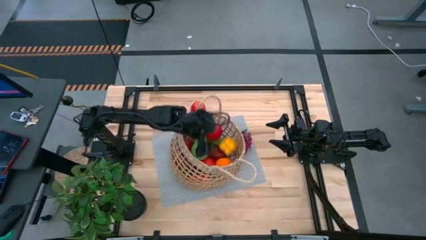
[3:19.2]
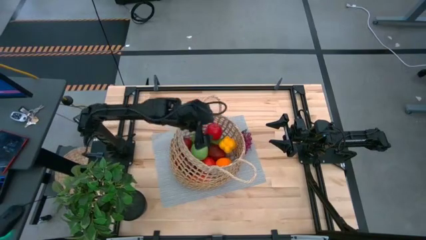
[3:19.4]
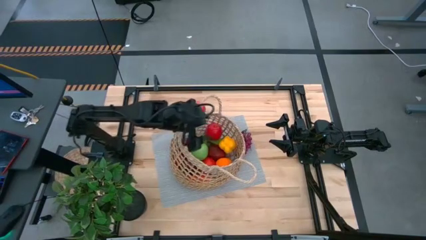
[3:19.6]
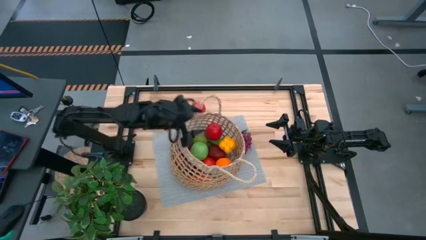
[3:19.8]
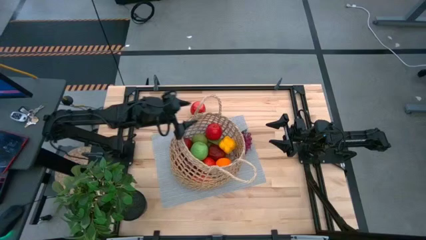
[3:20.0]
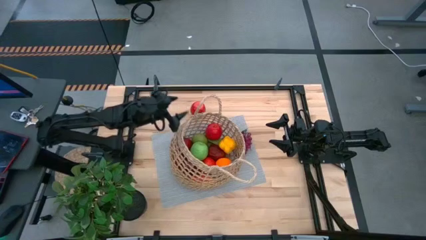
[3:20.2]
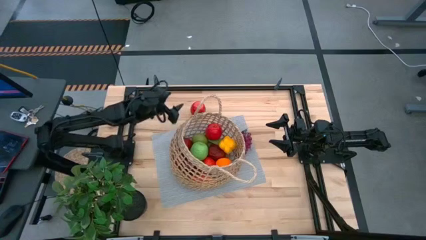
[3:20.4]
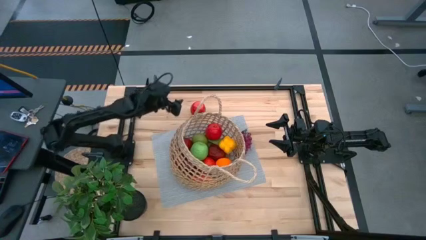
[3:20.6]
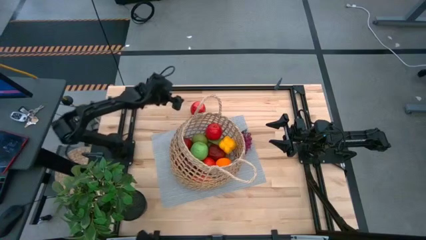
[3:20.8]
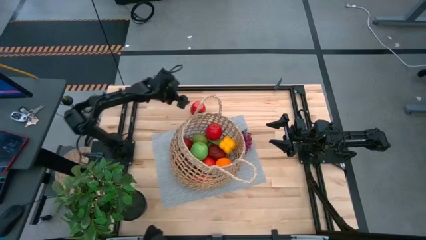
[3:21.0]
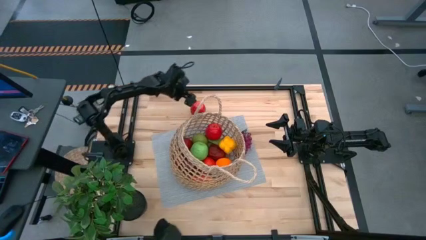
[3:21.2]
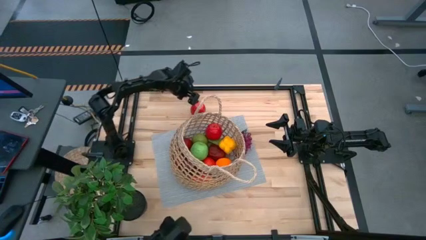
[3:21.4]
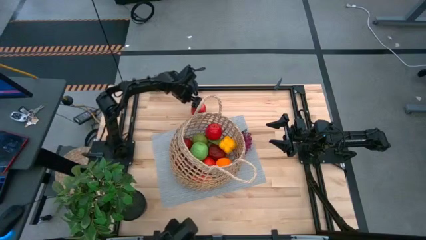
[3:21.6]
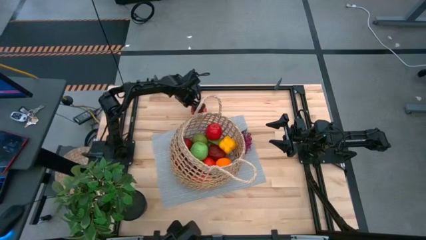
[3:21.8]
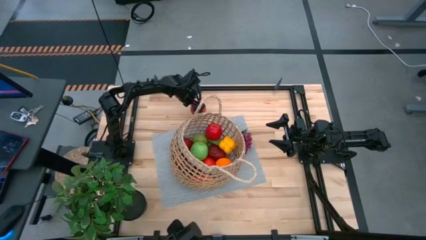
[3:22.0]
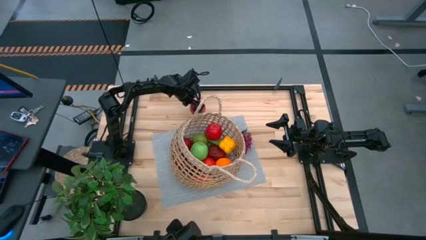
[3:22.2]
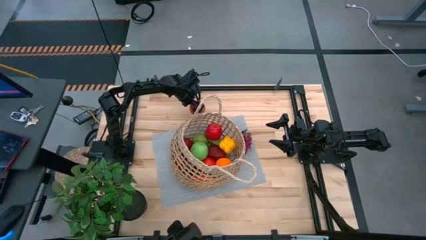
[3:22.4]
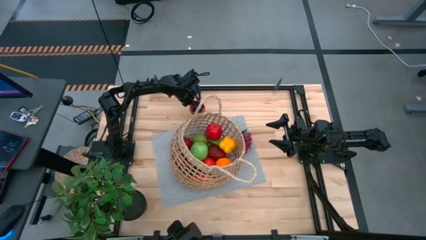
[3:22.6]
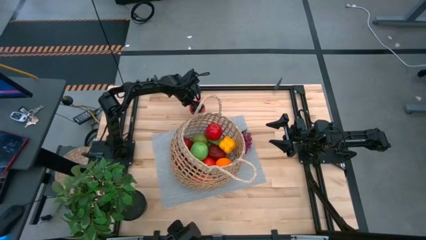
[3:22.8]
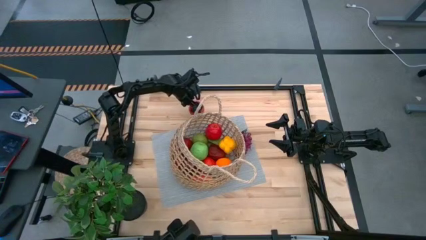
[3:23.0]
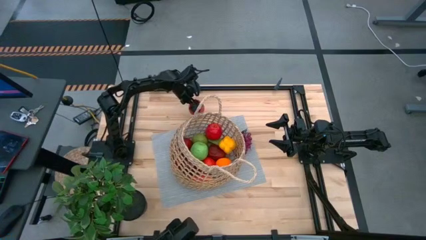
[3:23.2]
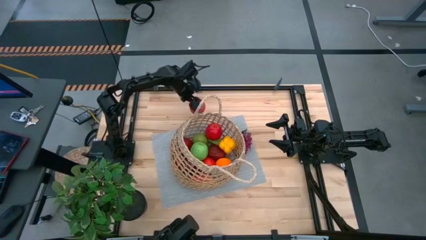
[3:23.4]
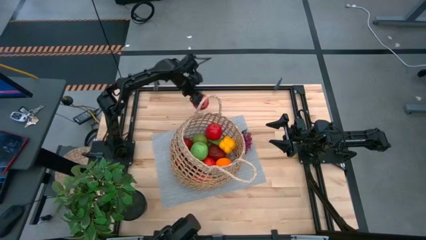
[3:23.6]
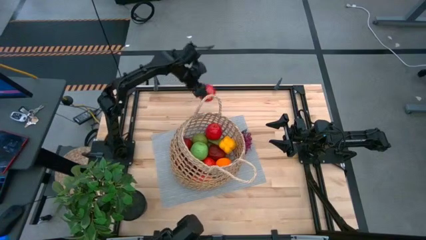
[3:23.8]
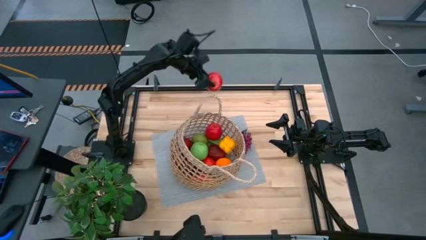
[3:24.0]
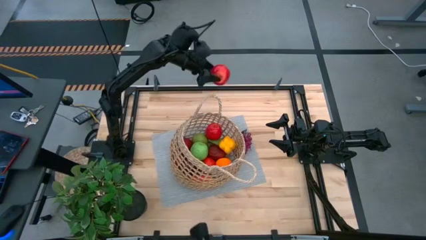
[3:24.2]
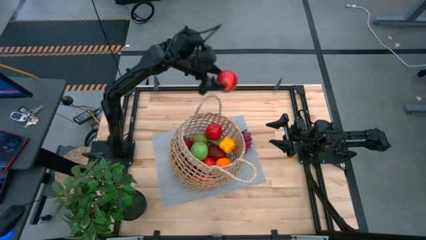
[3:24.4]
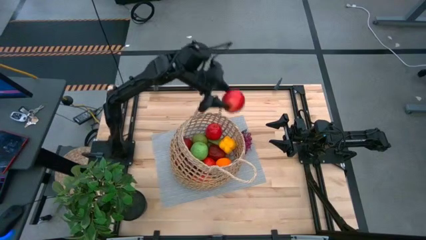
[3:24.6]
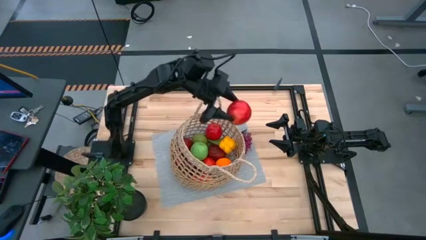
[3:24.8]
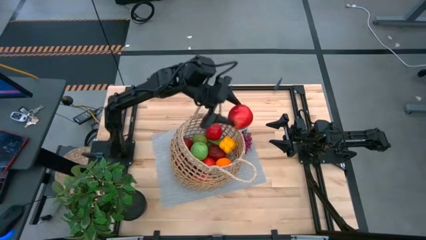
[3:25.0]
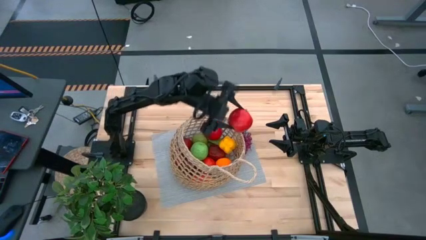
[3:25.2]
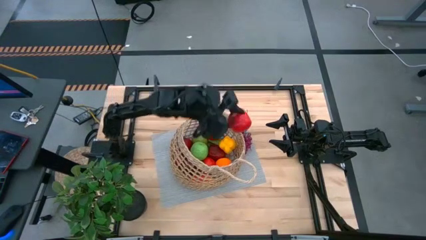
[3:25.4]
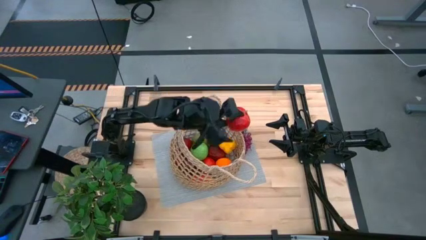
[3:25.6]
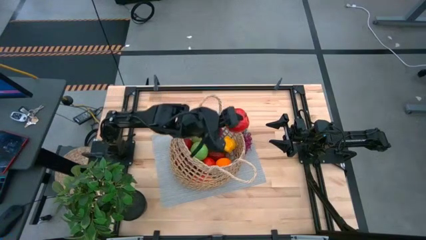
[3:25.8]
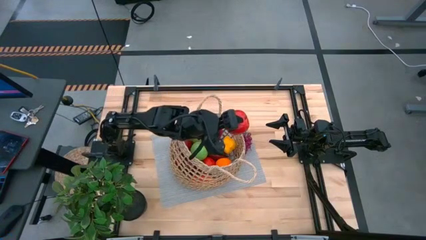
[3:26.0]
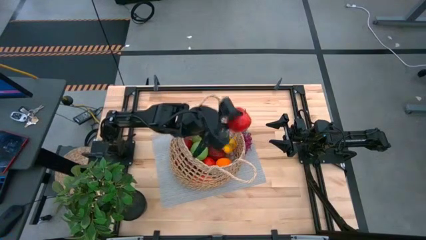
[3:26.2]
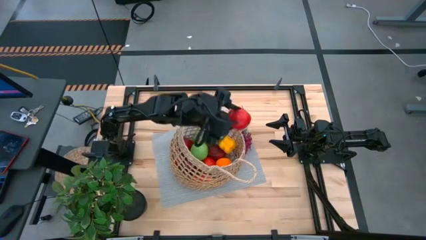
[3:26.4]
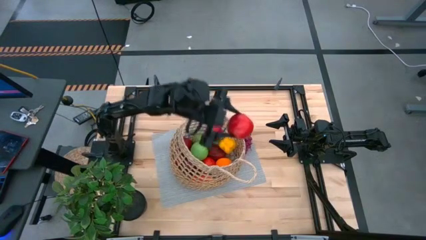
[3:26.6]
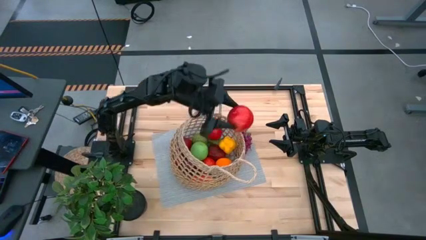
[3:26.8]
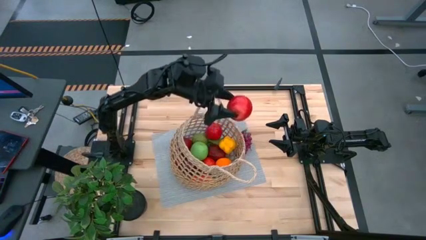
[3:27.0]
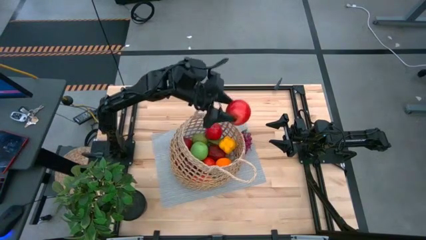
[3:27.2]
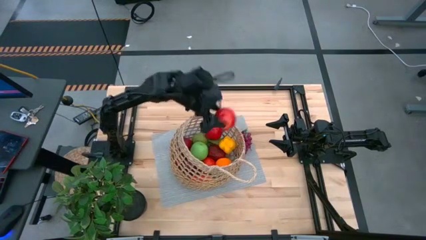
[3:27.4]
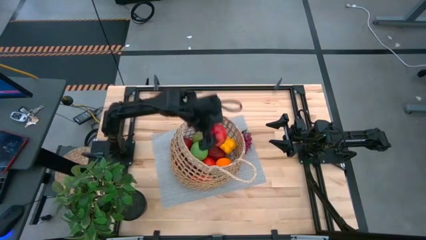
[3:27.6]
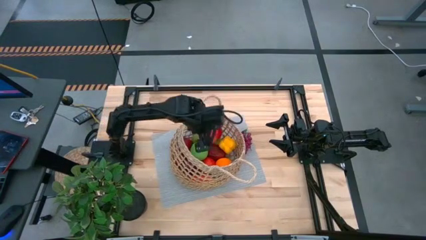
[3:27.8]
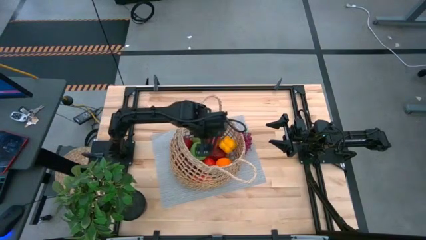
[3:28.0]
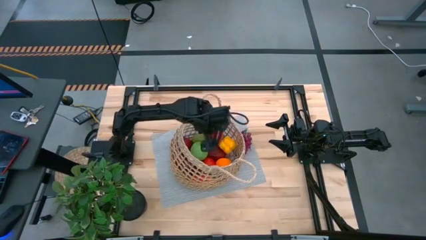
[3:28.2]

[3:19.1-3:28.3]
Task: Build produce basket
Put the red apple into the basket

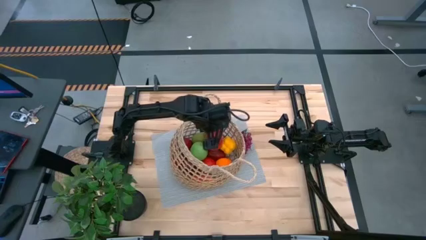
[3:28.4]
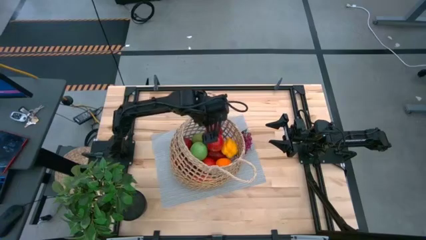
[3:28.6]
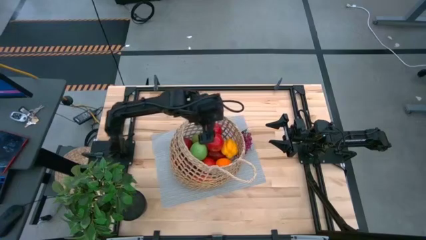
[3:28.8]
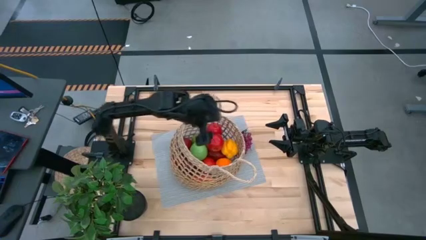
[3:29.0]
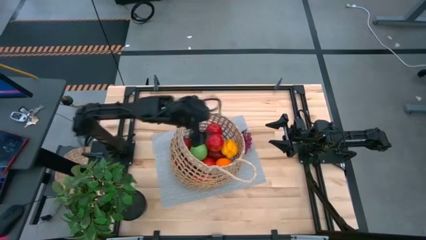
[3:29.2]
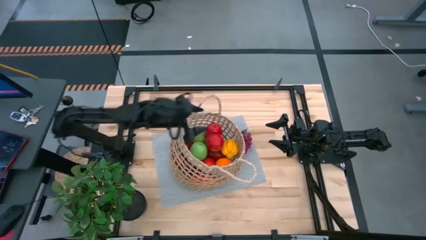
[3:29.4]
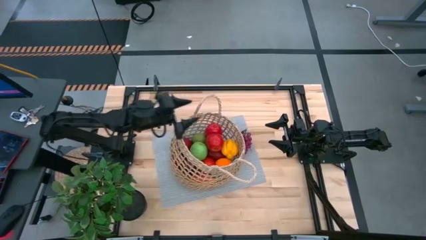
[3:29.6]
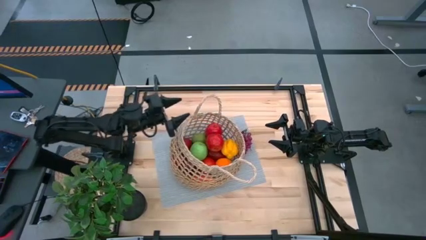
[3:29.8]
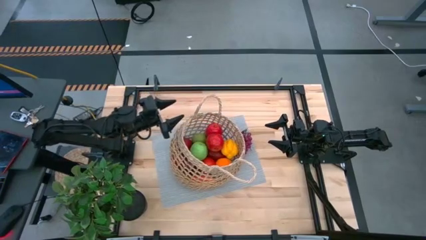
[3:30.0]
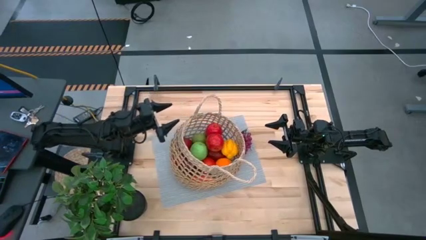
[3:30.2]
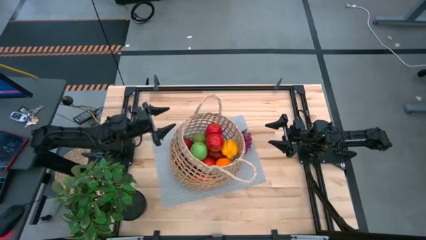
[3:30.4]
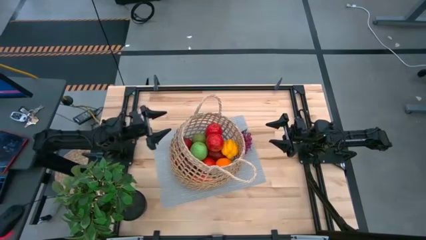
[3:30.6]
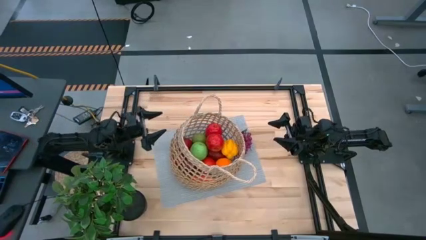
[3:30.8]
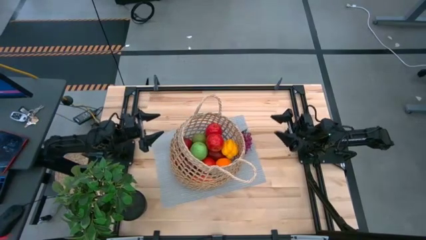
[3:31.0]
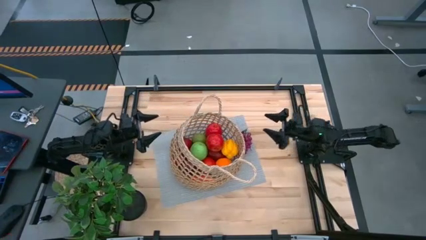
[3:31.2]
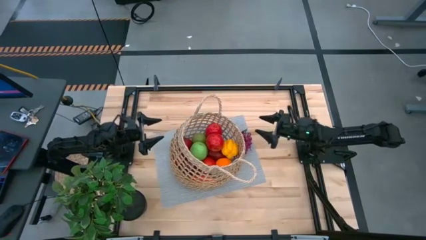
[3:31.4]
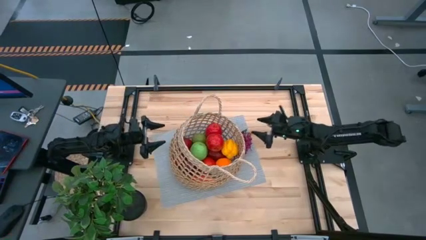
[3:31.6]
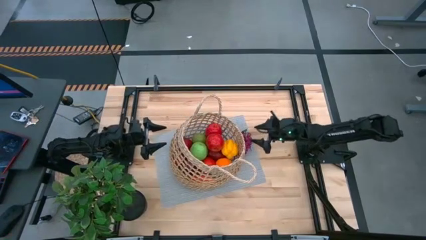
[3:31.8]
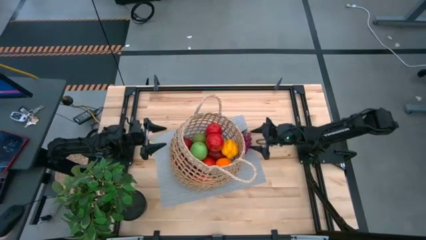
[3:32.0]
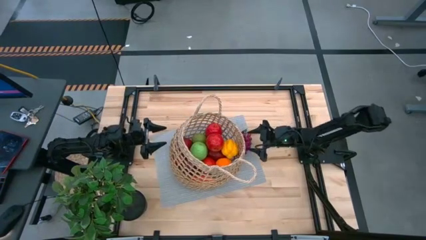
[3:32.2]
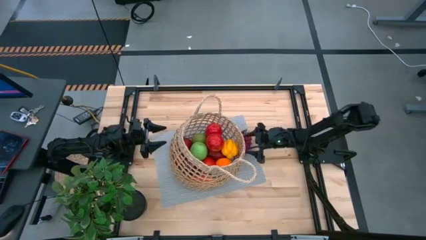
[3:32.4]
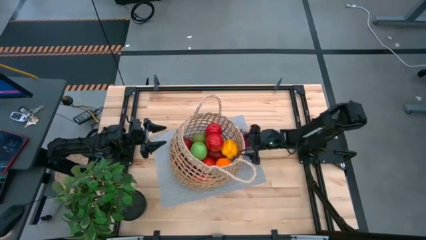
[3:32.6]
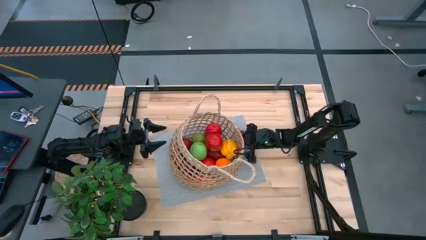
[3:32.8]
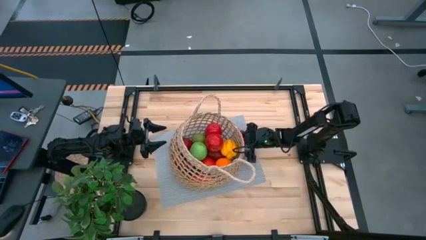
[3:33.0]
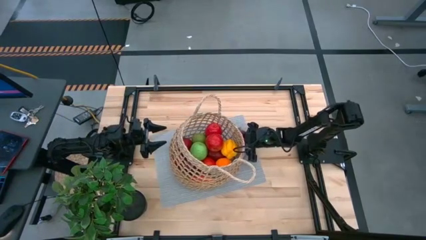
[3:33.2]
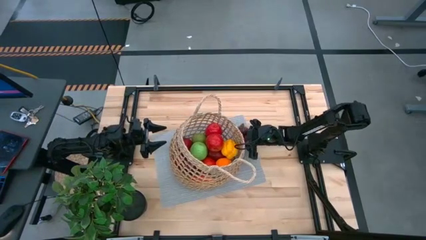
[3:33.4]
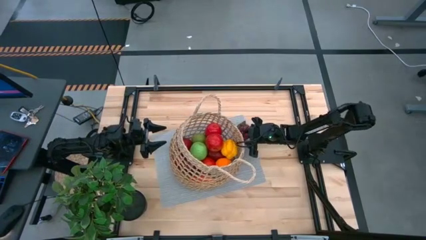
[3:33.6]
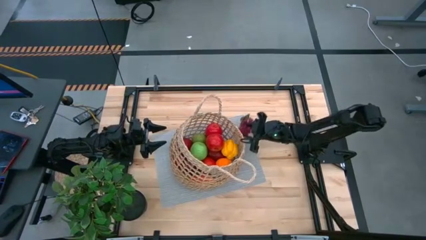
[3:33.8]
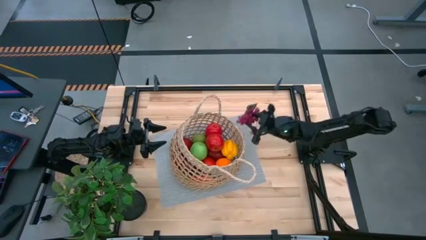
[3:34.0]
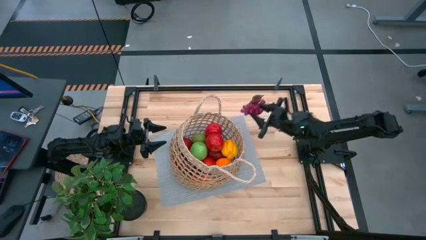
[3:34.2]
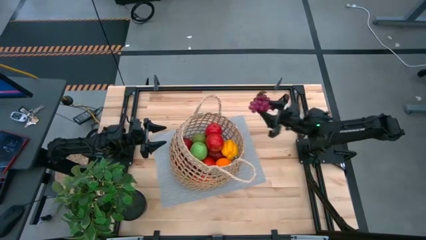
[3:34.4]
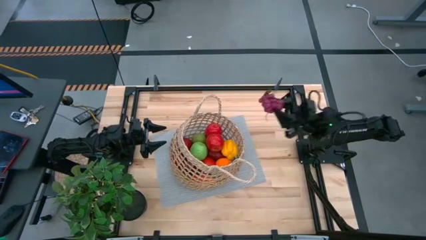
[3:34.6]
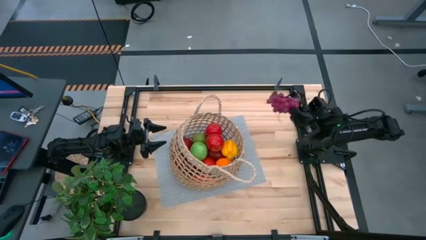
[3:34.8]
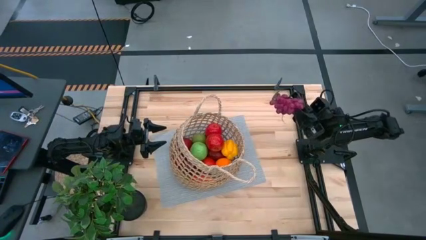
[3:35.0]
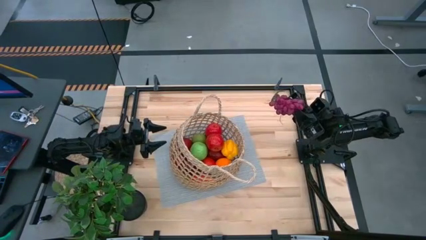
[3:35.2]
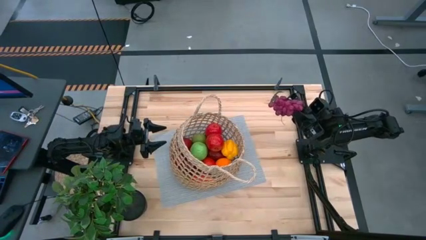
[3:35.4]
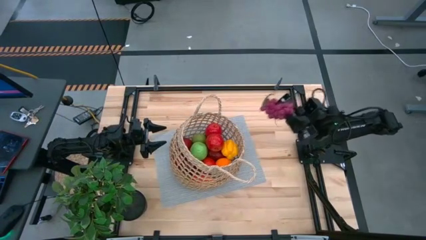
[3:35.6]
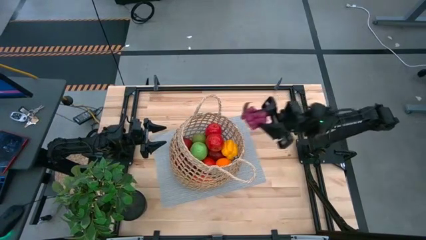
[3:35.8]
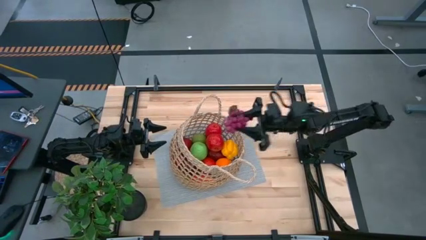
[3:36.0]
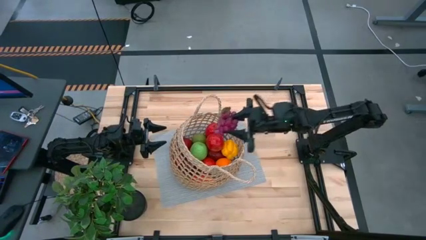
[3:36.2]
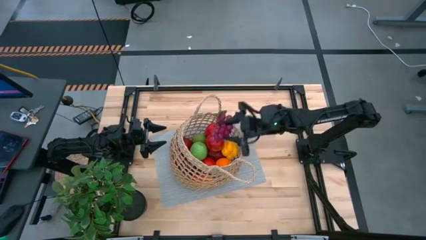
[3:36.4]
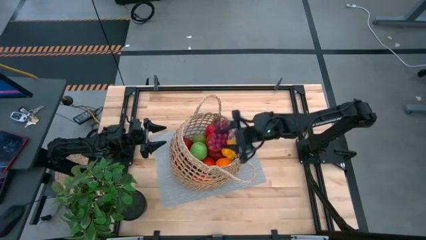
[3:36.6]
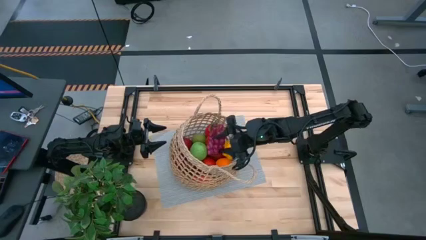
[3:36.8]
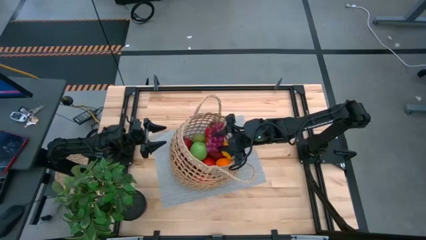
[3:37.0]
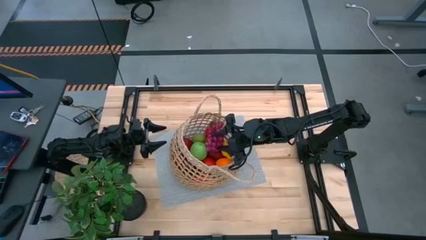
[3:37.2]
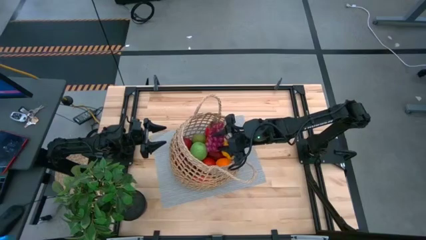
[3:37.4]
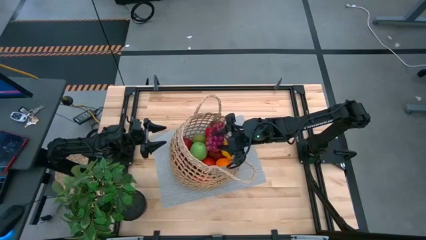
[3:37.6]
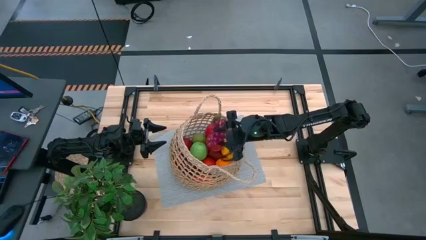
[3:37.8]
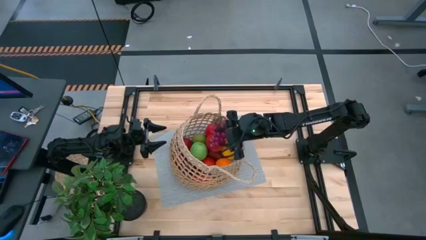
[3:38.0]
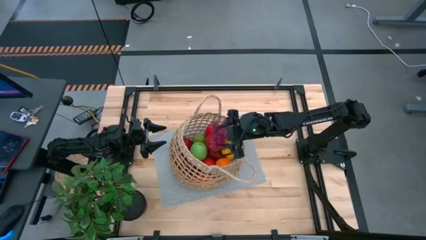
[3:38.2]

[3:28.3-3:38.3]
Put the grapes into the basket
